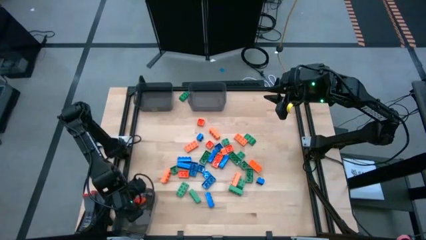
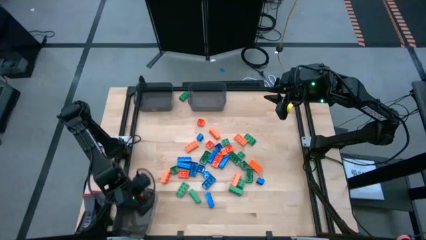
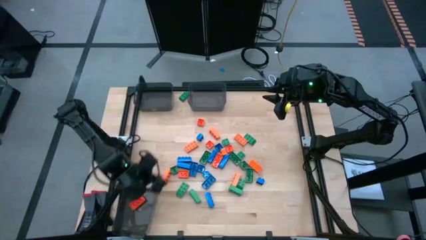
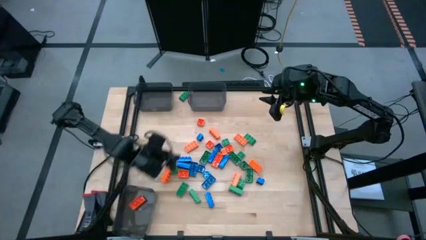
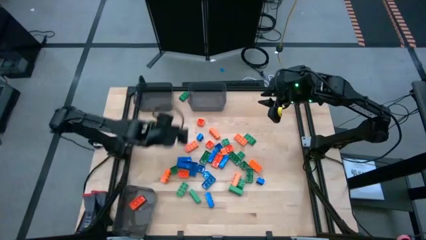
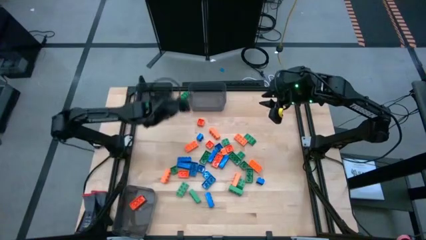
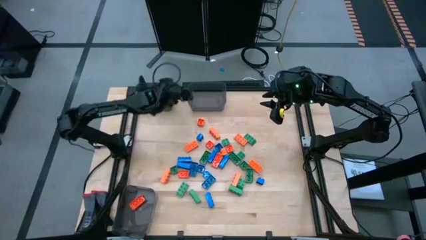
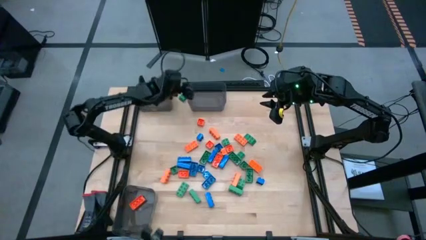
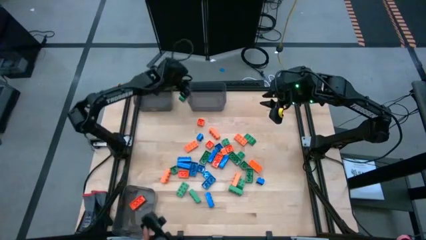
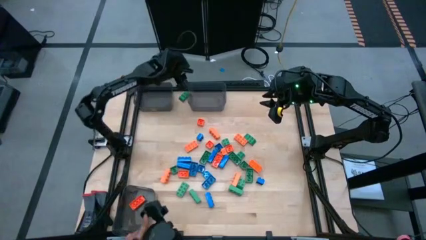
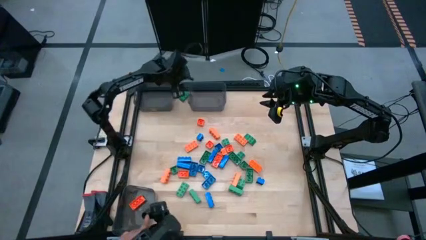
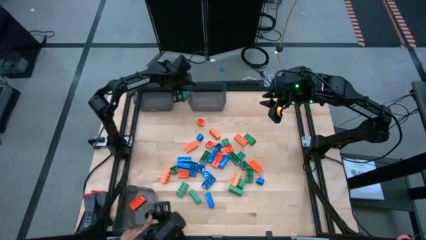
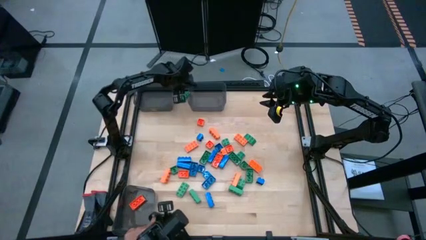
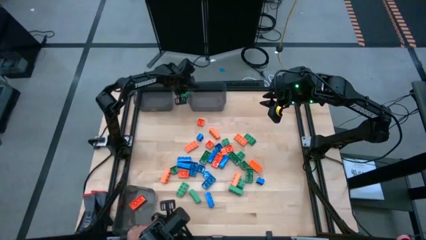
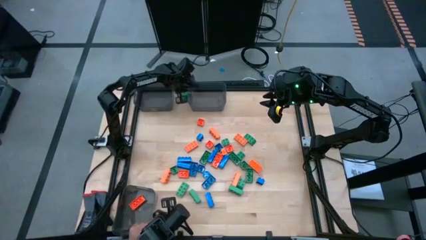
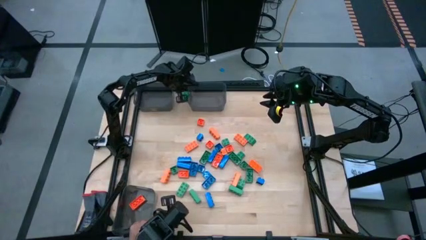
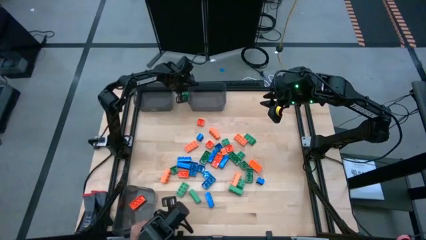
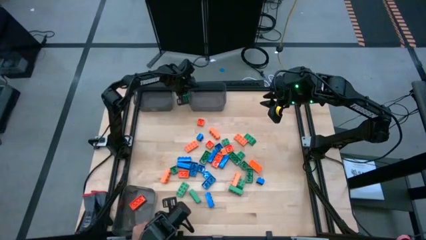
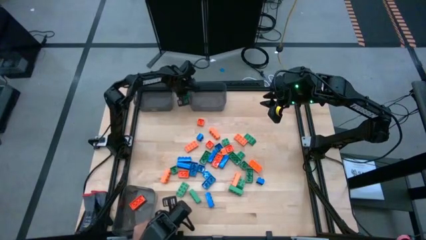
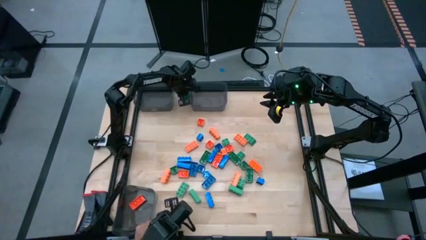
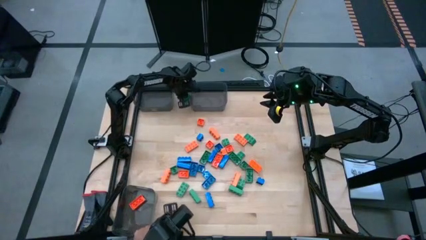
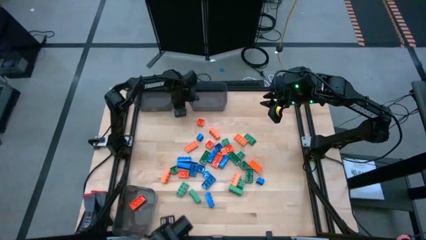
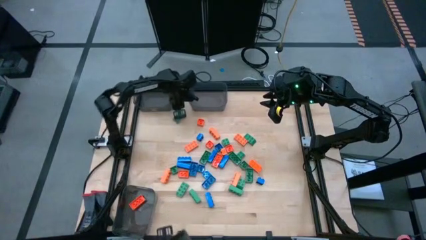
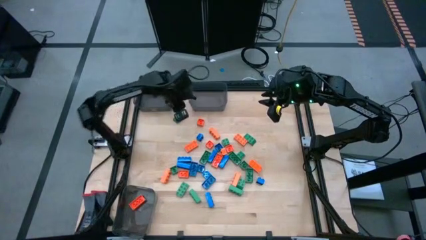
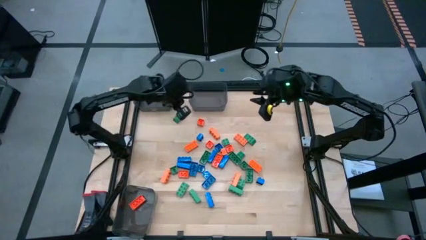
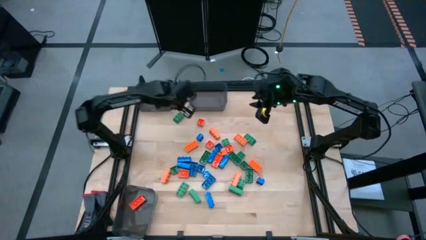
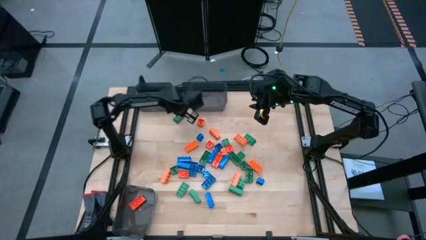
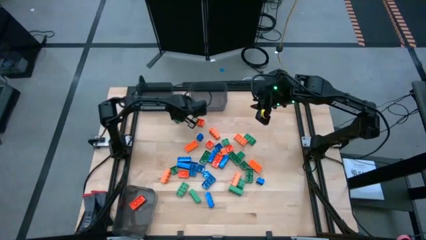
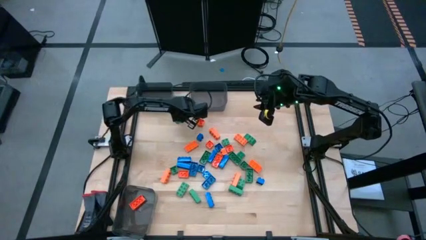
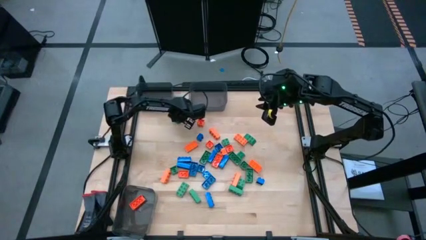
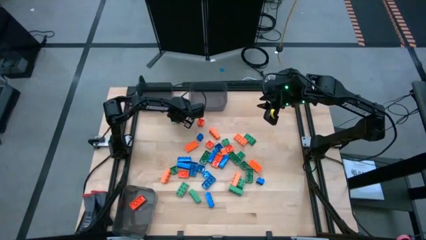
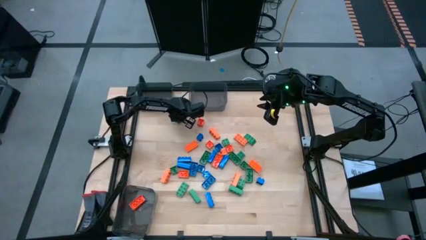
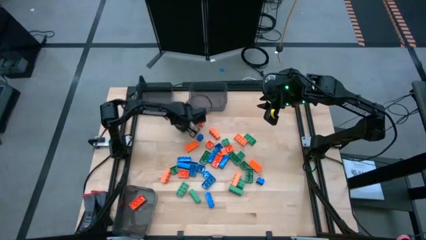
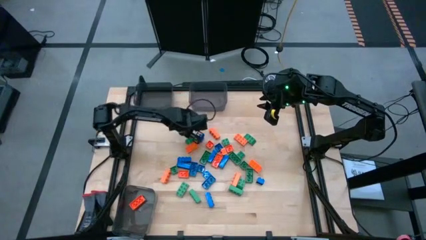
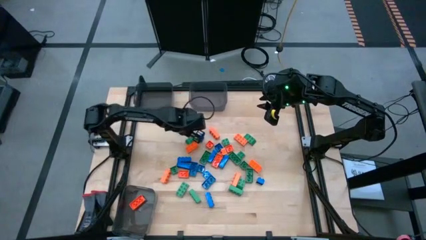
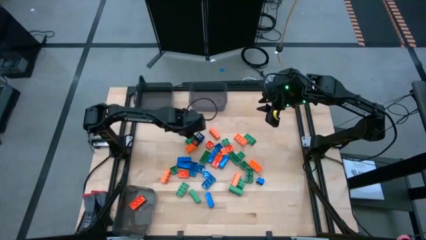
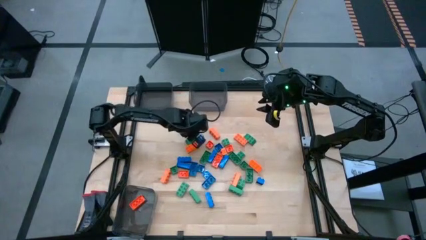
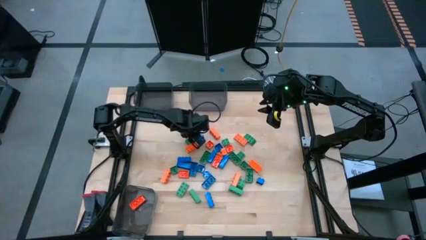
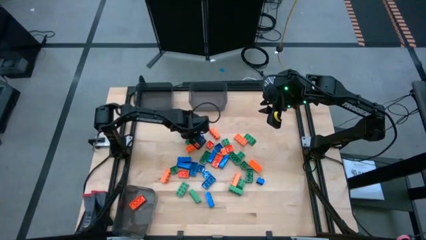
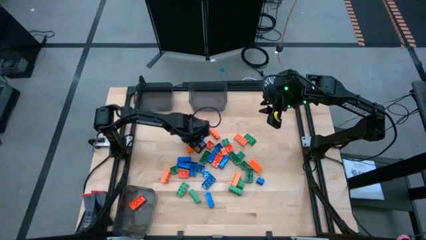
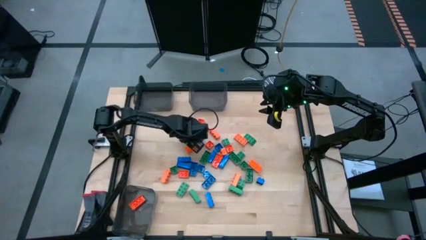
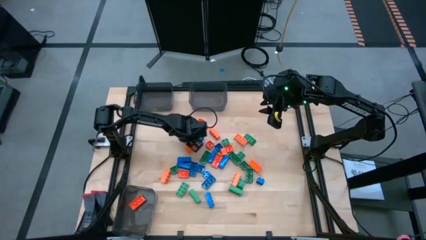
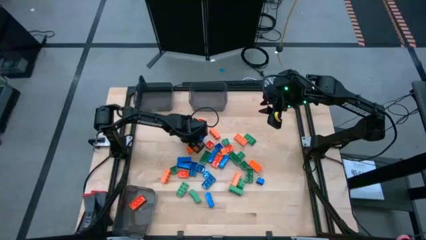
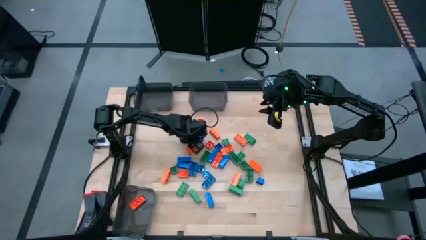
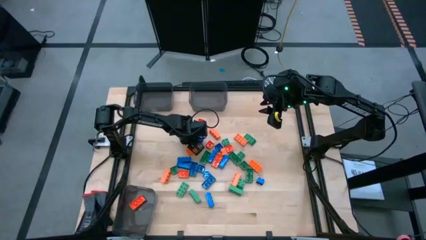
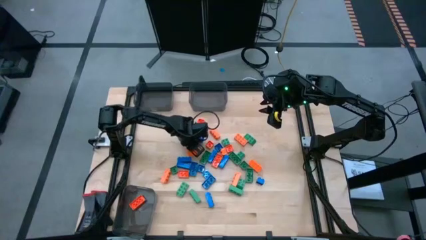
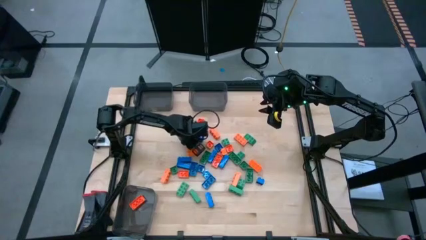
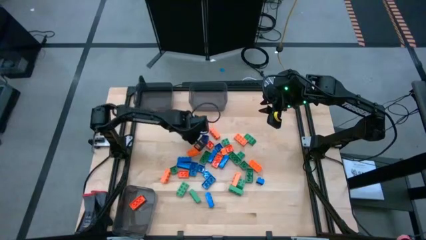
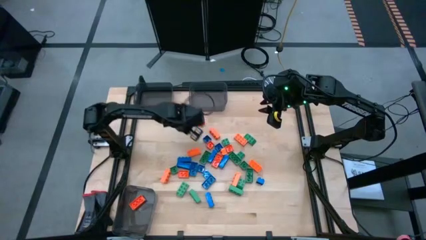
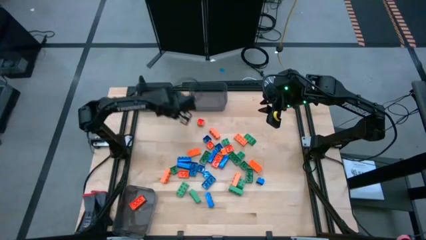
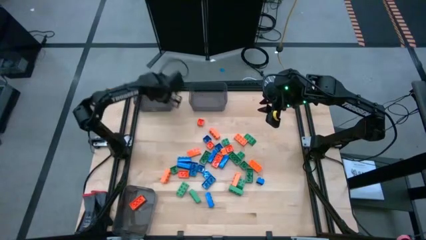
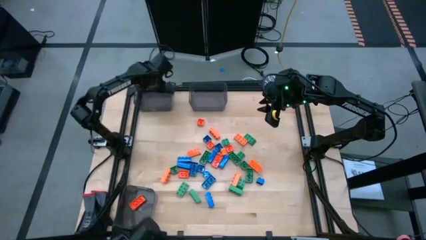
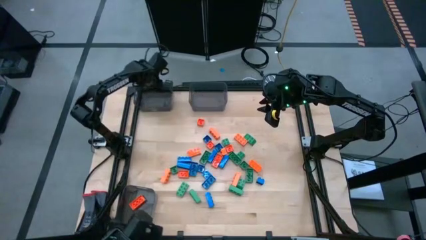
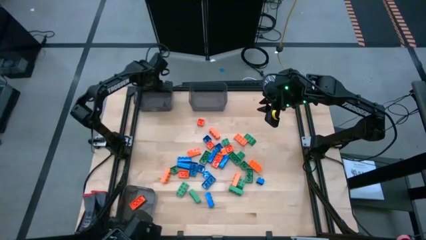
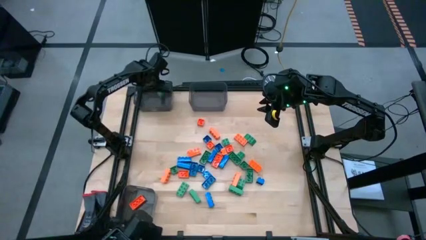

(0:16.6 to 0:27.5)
Task: Sort blocks
Put the green gamepiece into the top left black bin

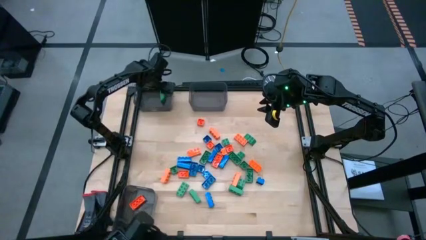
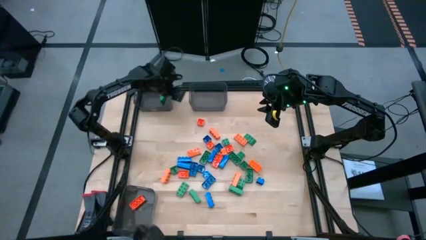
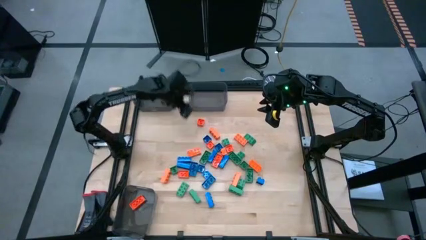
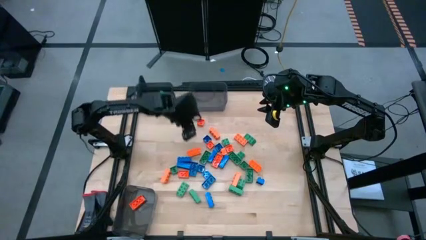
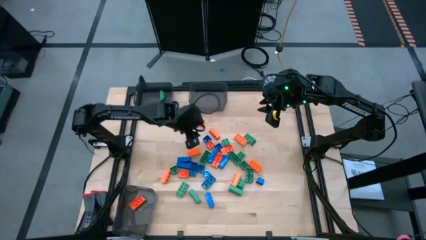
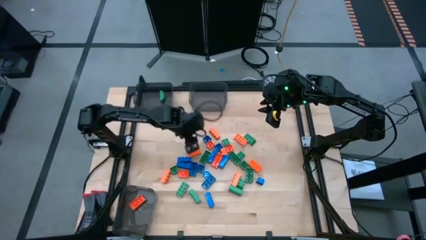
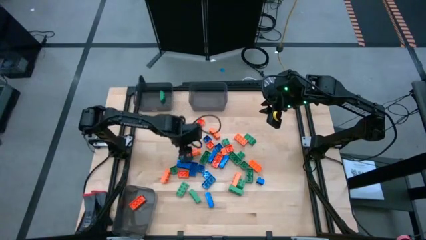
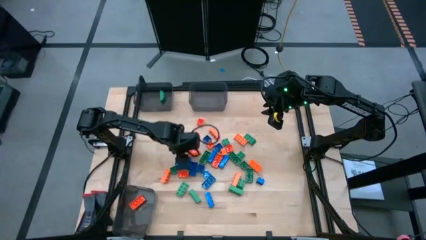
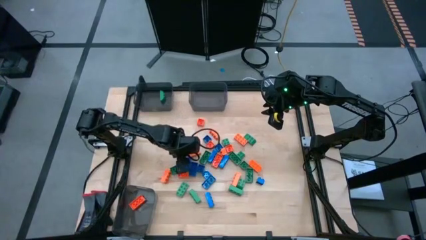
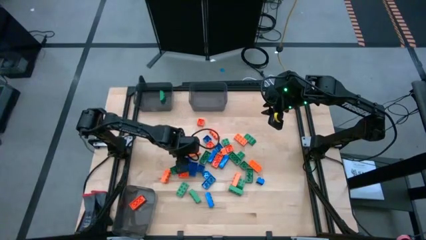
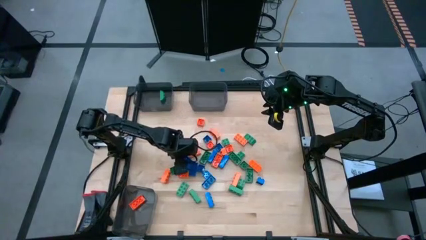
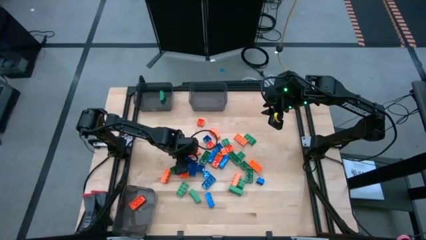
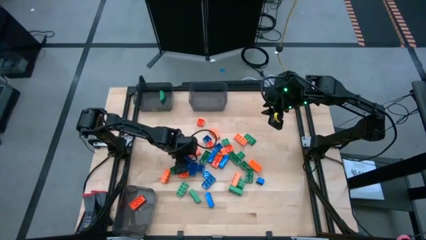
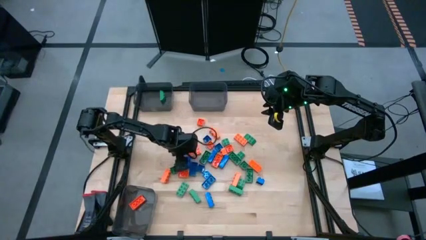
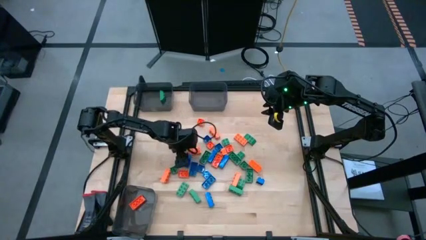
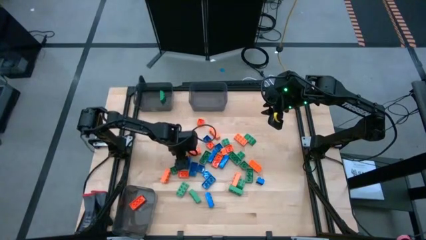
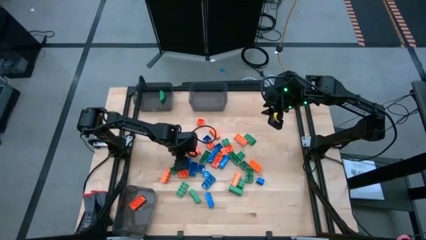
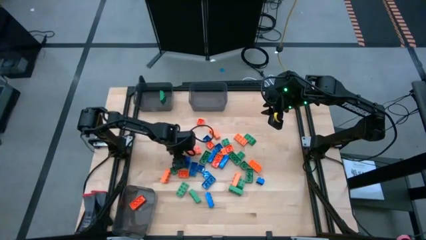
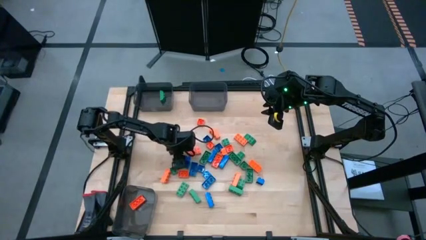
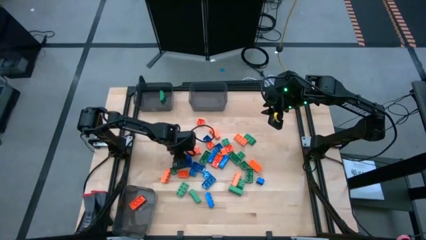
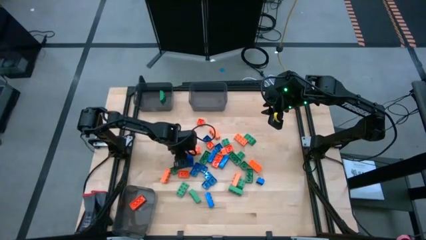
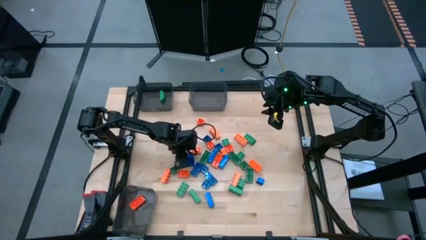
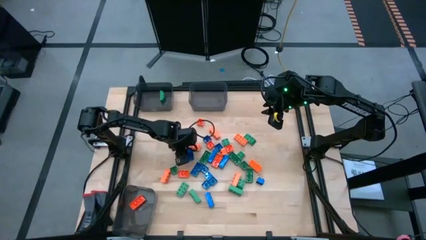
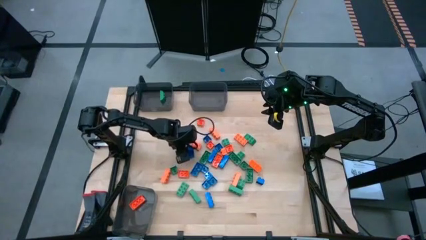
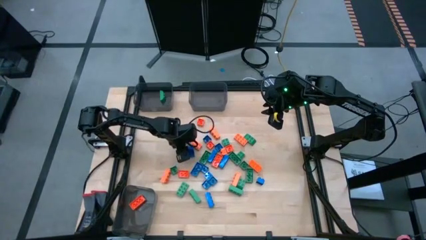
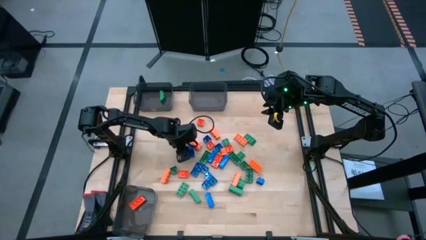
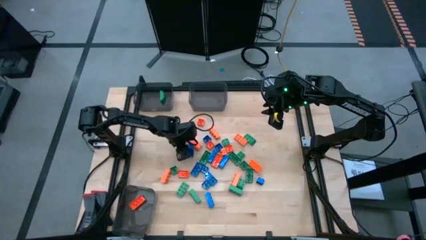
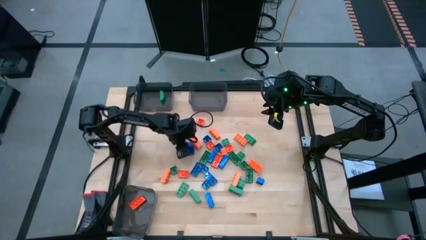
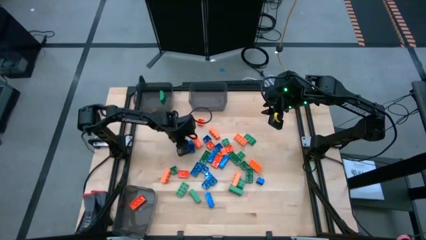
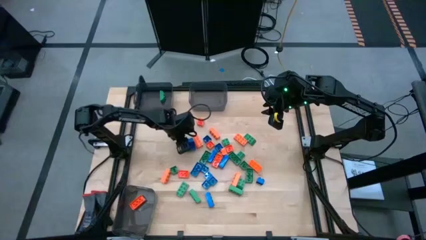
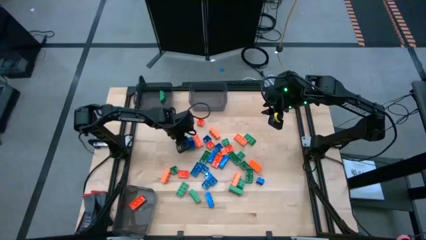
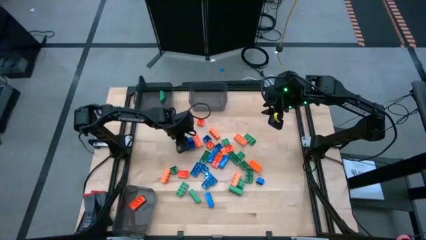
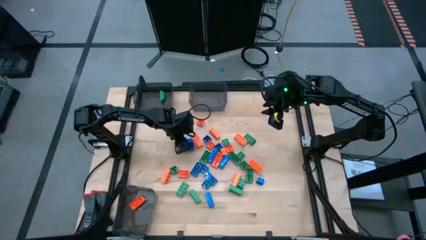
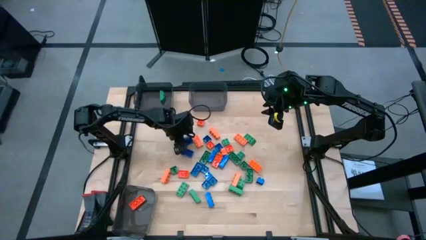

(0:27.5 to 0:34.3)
Put the blue gamepiece into the top right black bin
